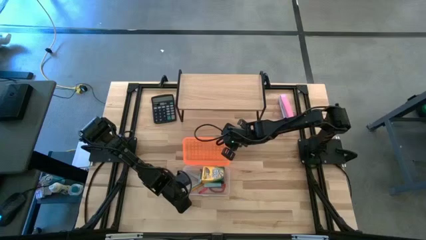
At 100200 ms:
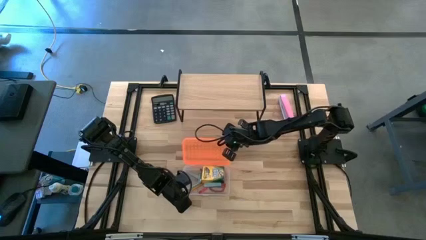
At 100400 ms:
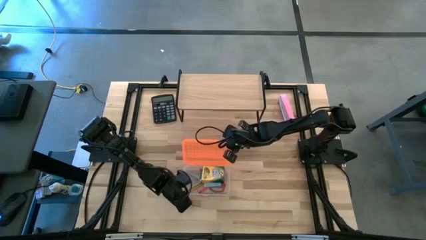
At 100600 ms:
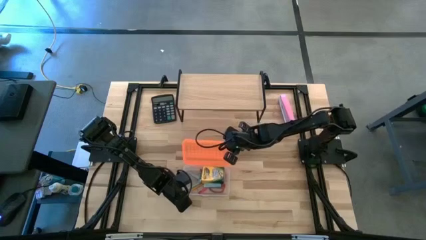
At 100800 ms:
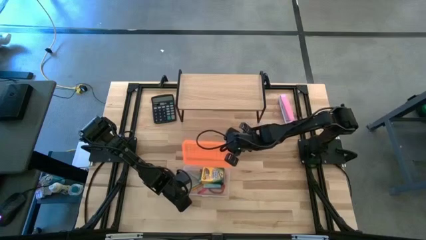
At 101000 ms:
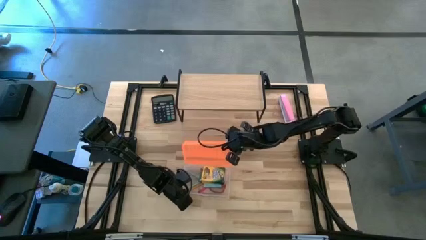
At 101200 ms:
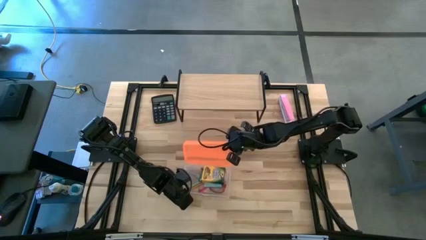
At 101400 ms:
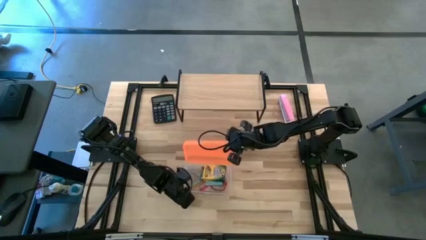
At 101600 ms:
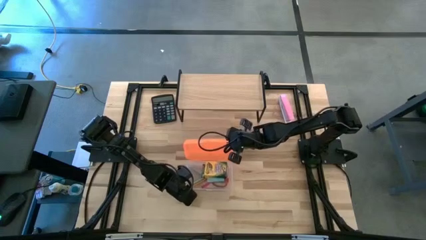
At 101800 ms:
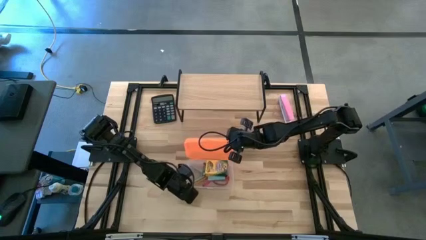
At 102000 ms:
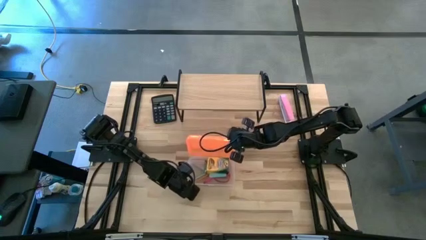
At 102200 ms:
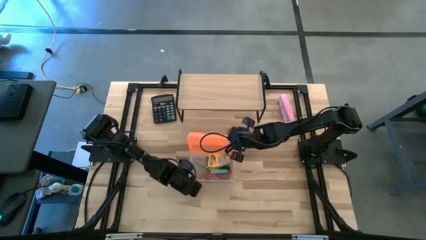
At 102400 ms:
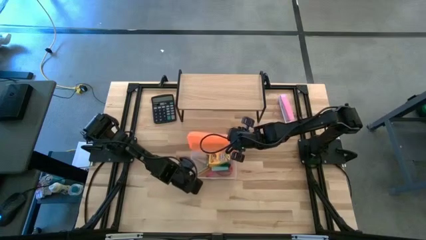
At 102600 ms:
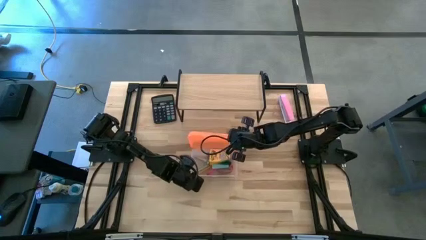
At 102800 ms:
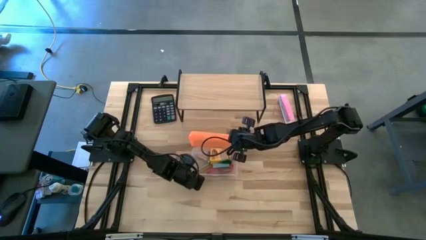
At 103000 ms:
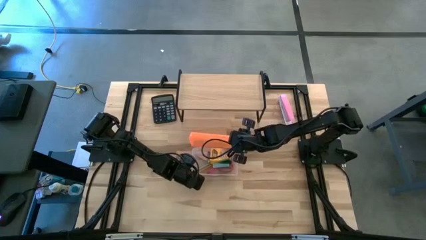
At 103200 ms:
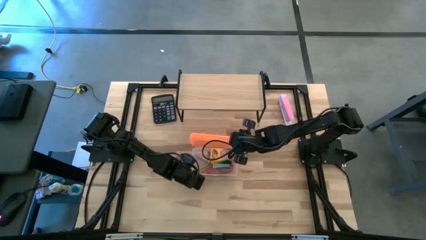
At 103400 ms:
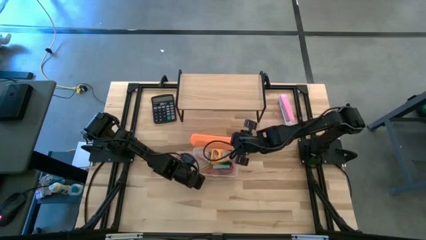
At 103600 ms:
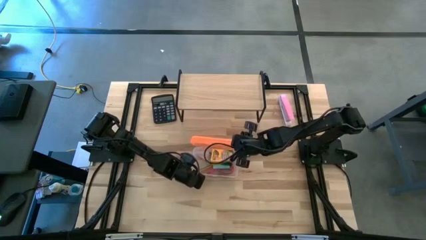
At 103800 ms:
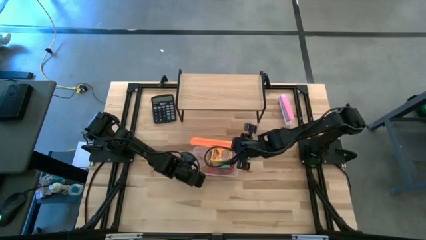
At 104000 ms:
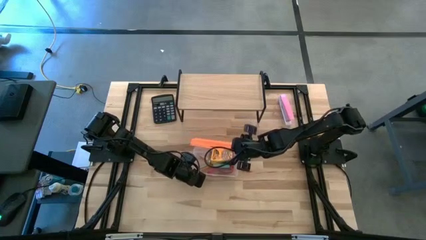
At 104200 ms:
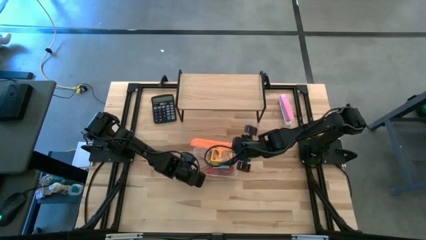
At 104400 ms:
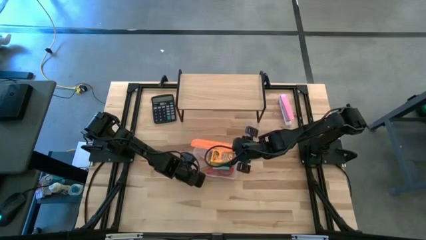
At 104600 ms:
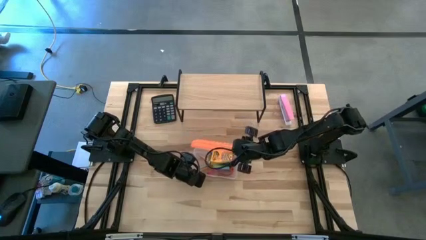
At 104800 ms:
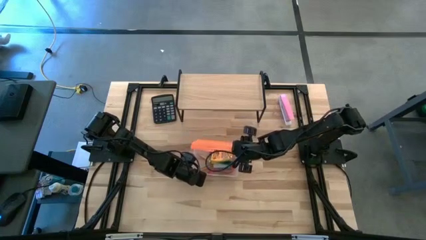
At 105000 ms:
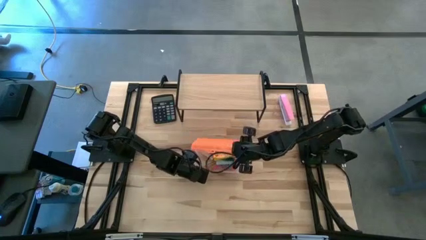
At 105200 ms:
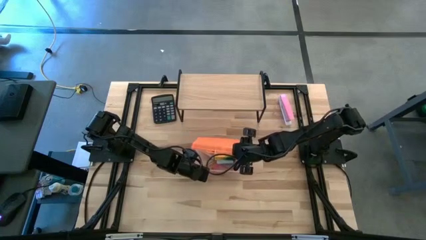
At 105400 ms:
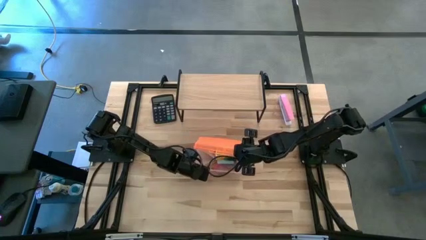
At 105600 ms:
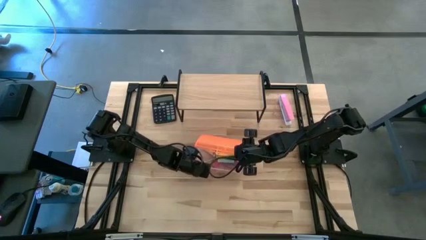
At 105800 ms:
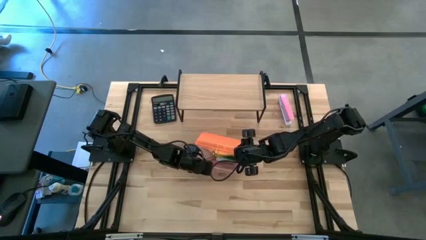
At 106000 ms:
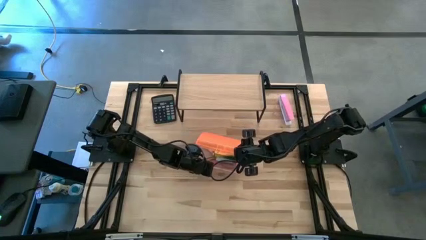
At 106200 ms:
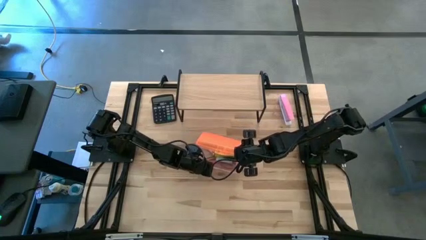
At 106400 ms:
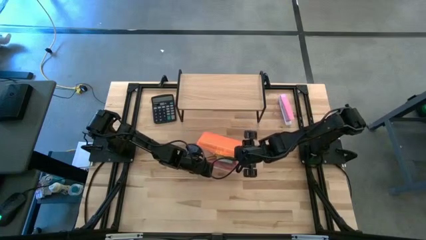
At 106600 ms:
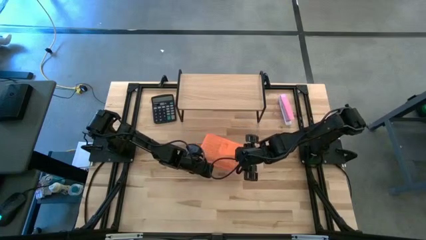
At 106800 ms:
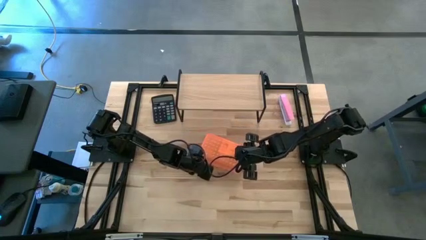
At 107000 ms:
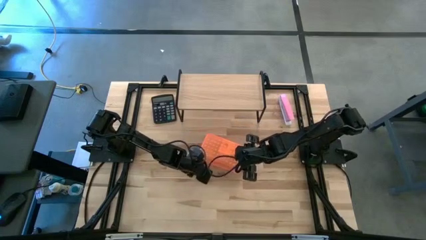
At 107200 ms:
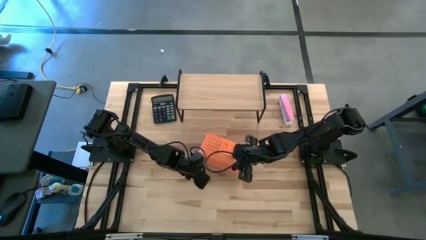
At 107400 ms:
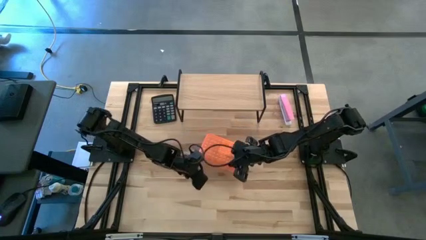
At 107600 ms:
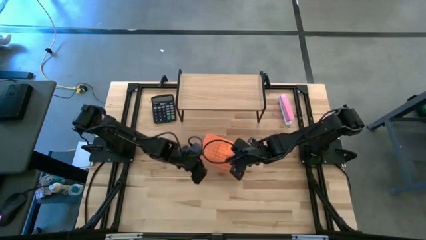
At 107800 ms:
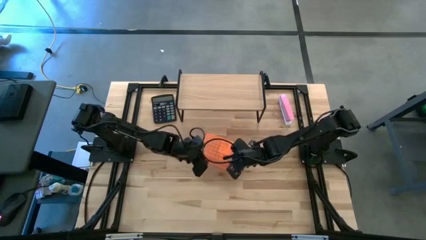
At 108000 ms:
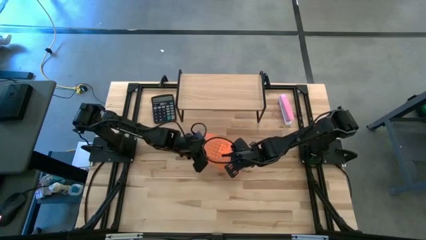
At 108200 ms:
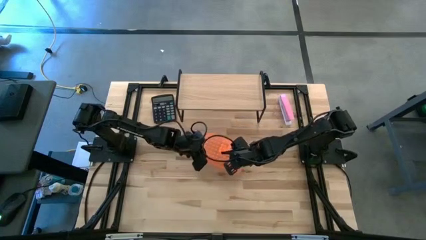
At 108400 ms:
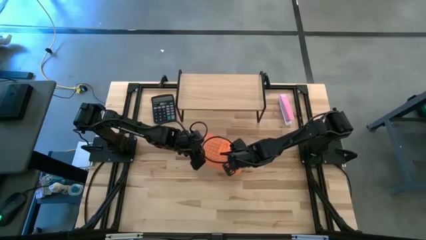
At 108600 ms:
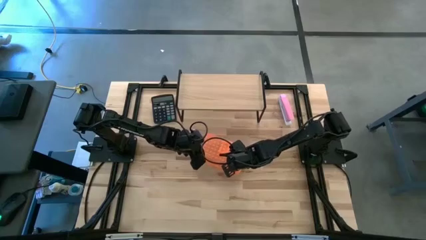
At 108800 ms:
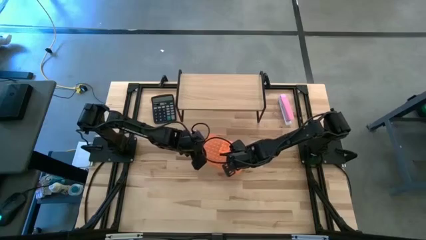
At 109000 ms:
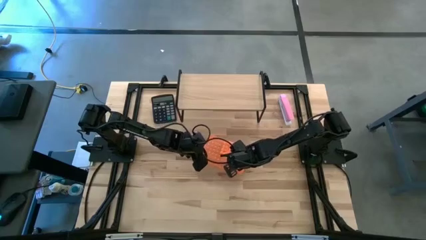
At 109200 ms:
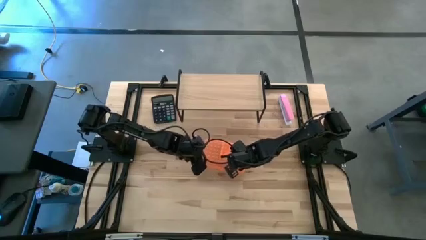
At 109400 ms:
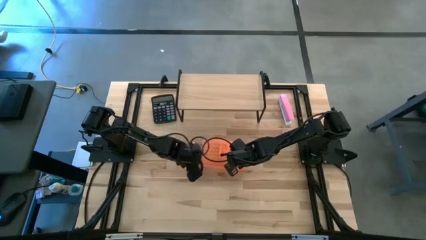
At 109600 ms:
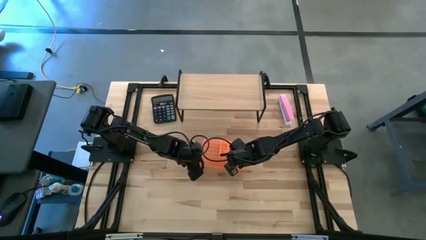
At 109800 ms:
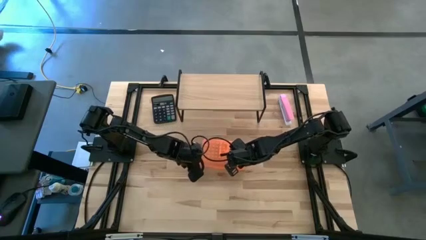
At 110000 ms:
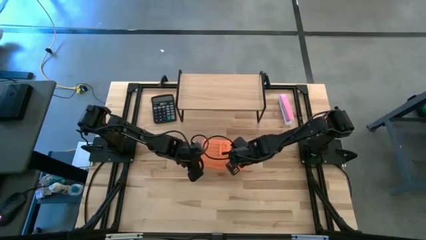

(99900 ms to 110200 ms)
Task: Pack school essentials
Close the supply box

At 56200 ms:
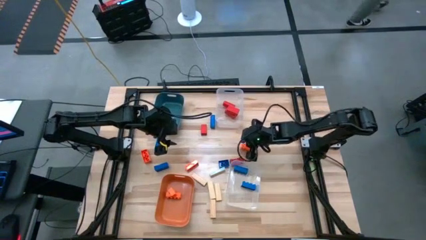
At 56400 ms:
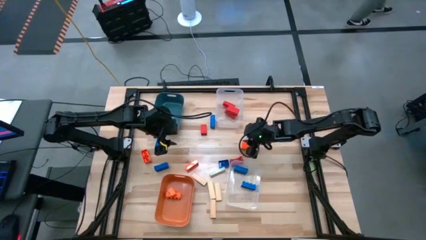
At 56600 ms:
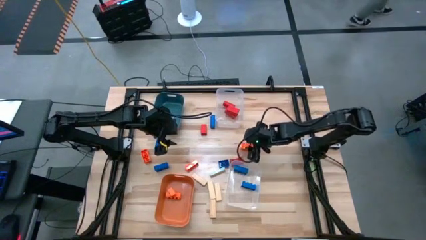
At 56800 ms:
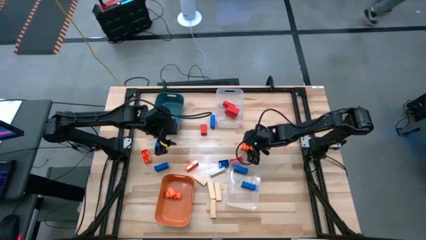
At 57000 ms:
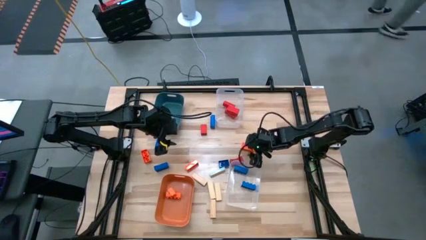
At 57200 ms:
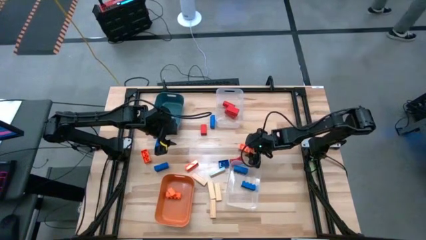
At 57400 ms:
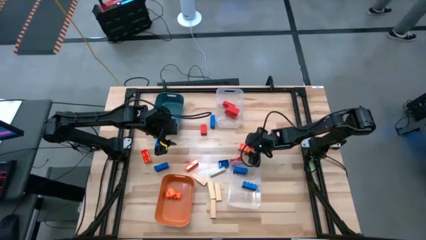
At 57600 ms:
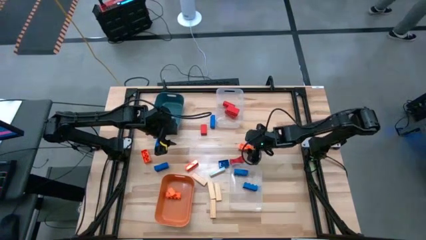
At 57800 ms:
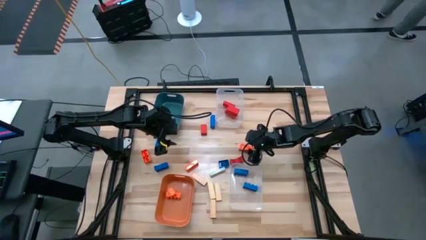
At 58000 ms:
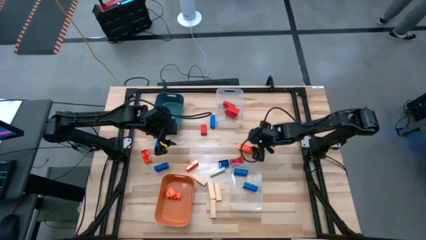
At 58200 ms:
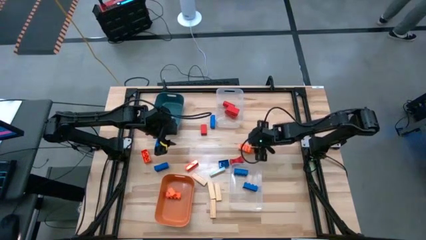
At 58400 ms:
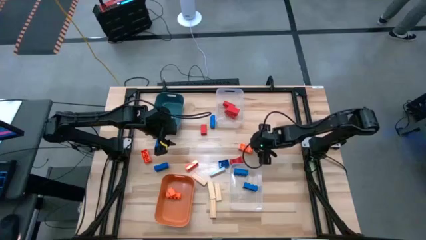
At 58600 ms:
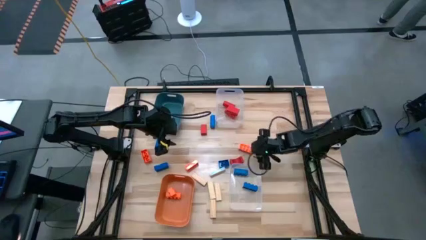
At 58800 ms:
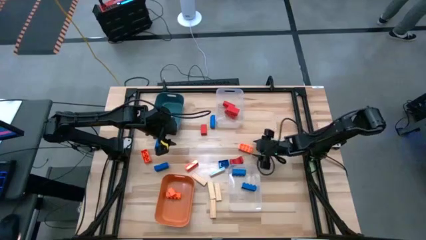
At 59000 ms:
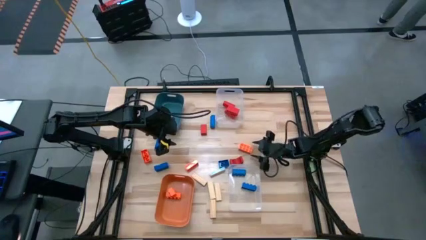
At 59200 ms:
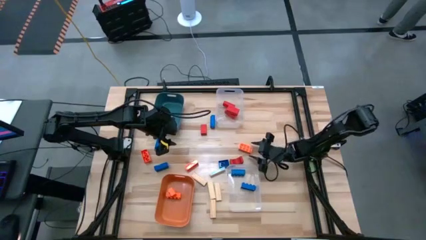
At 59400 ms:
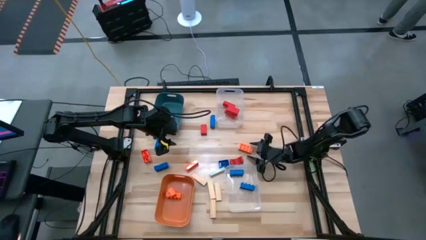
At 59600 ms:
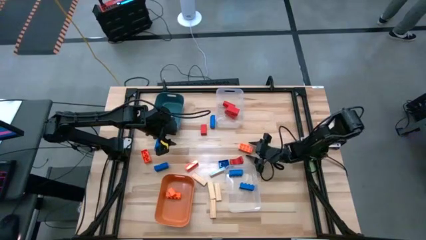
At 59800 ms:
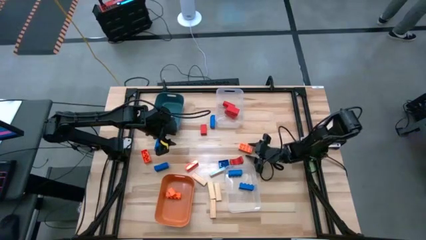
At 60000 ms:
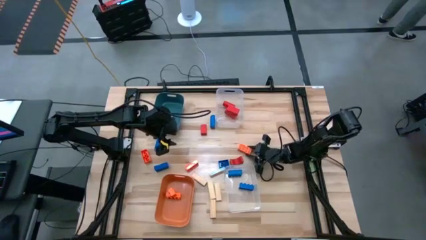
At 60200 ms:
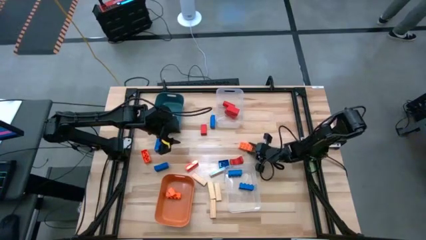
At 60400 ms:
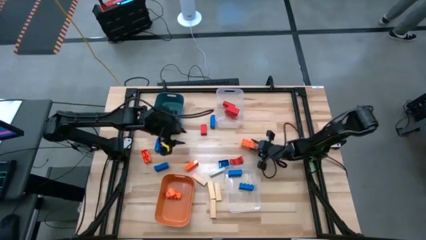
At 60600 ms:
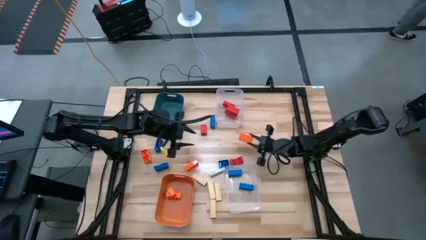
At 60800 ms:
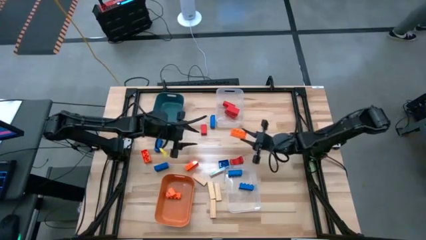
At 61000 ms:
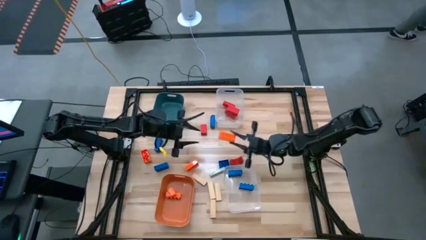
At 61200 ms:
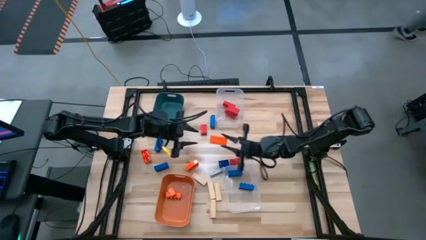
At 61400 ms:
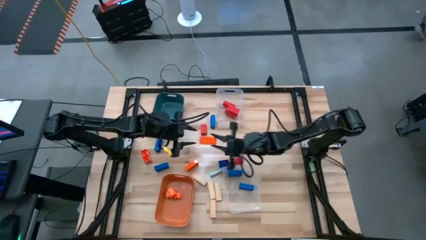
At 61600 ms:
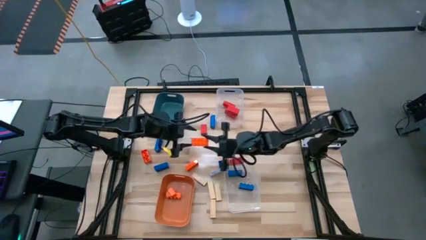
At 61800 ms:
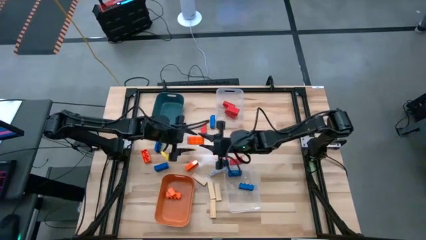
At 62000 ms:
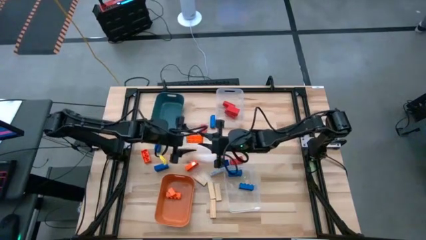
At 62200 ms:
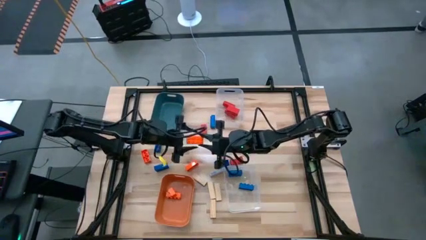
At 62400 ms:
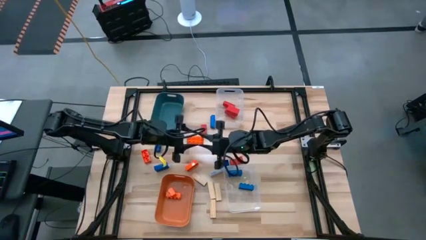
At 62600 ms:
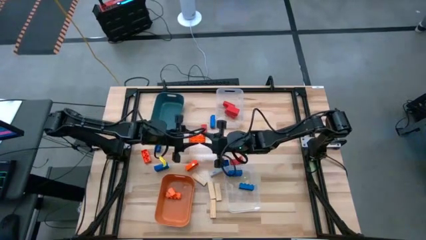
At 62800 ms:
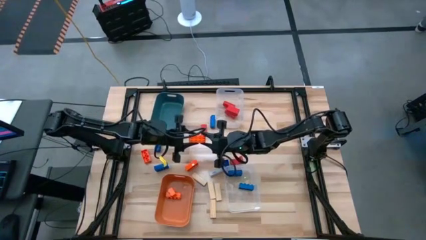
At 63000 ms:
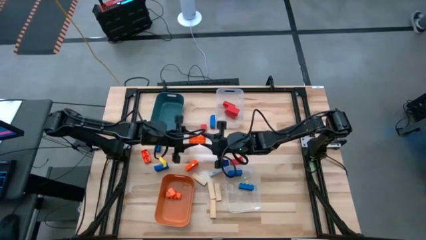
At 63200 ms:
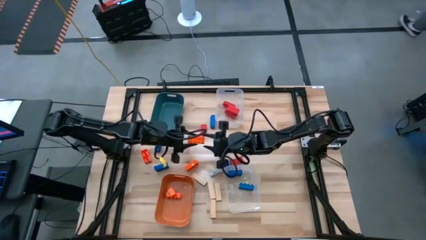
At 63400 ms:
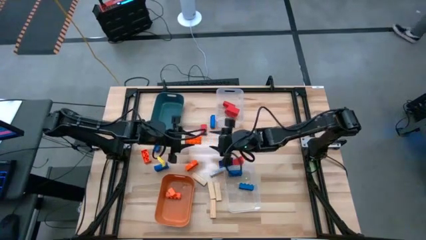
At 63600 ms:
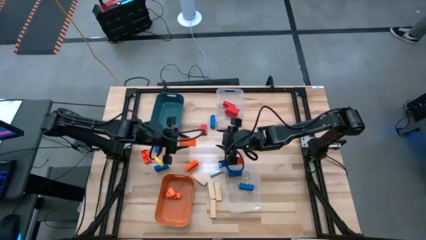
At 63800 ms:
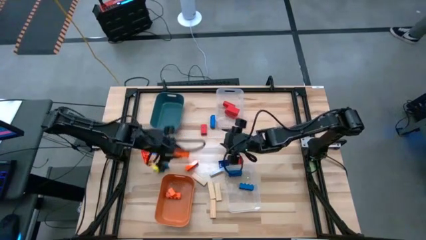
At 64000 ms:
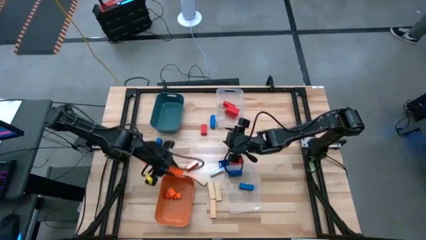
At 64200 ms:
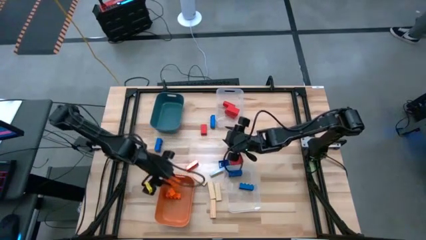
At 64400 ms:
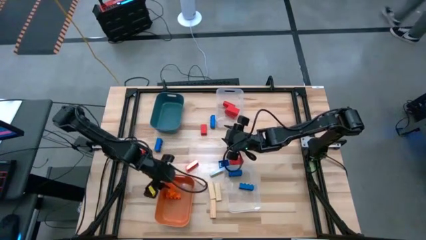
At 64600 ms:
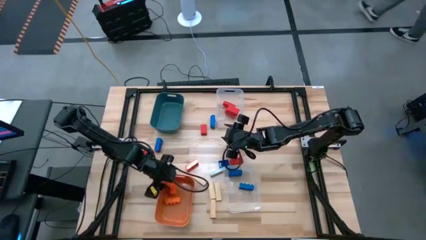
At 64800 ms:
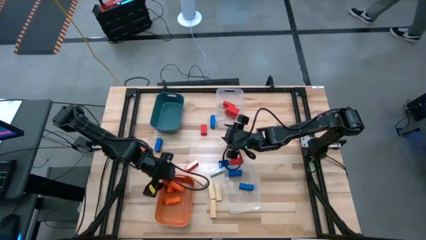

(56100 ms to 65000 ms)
Task: Sort blocks
Put the orange game piece into the orange bin
